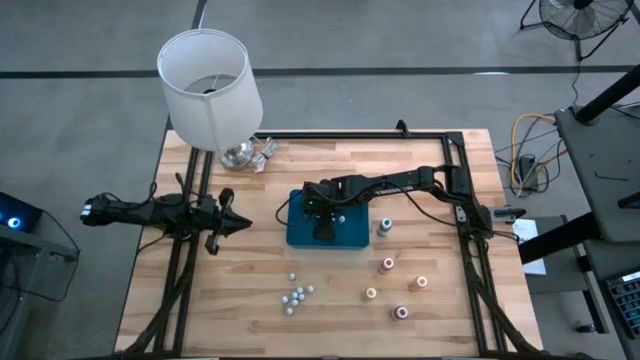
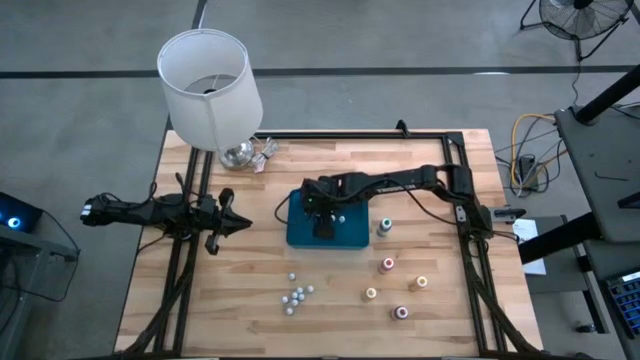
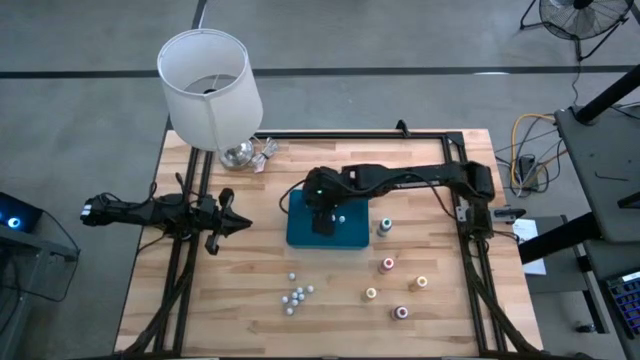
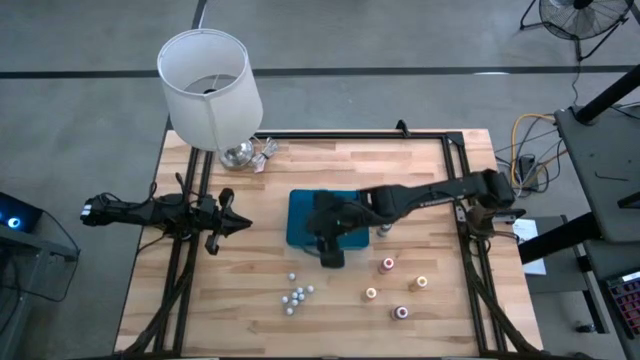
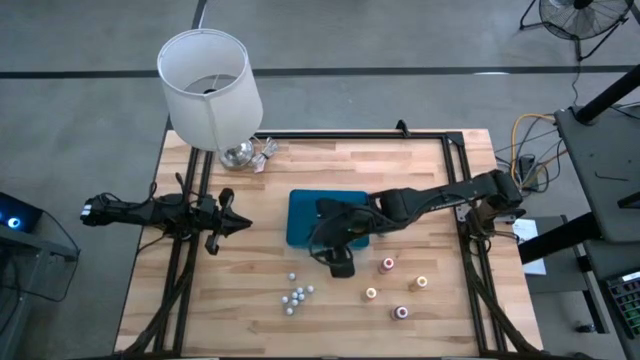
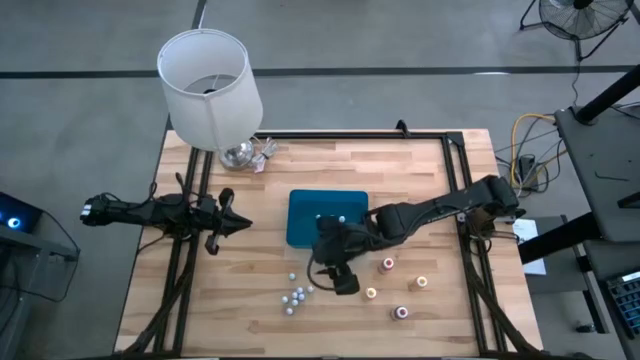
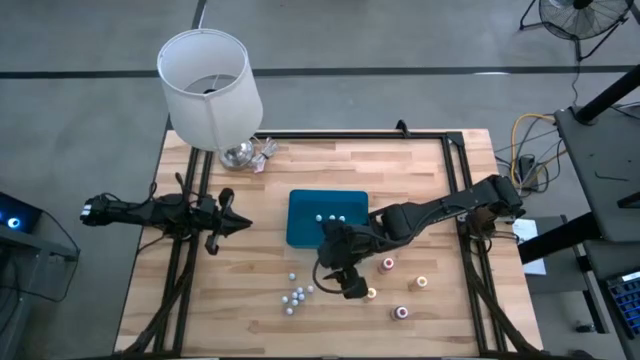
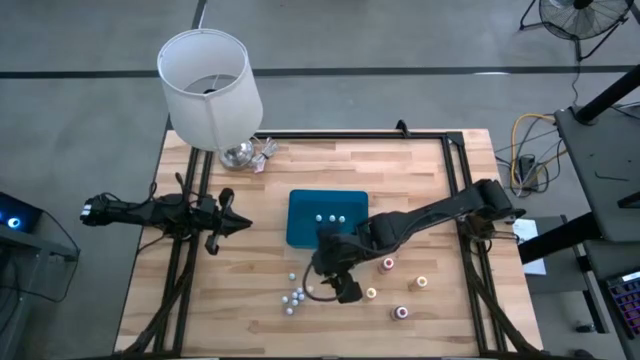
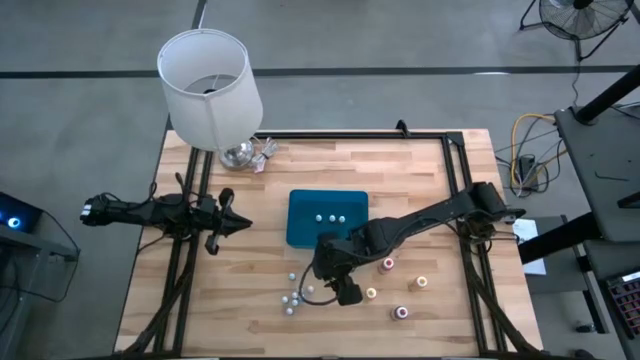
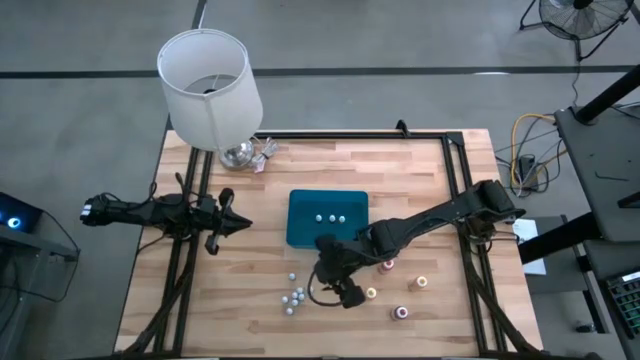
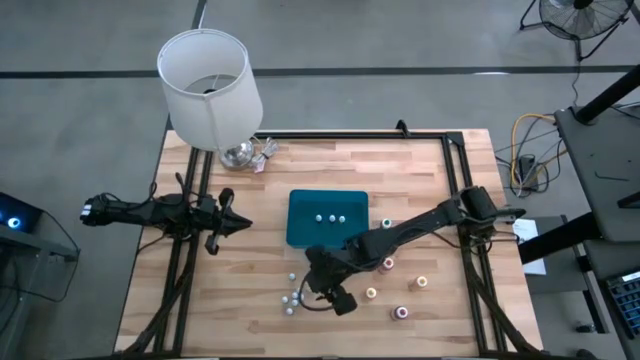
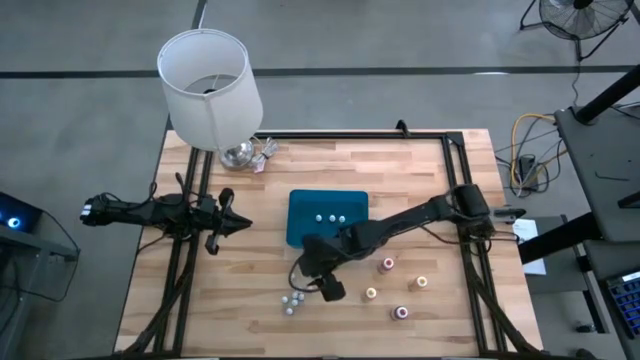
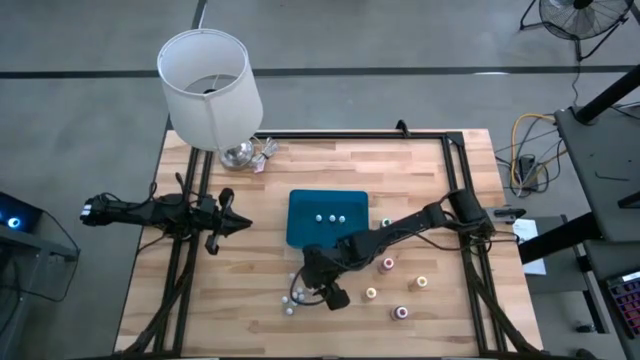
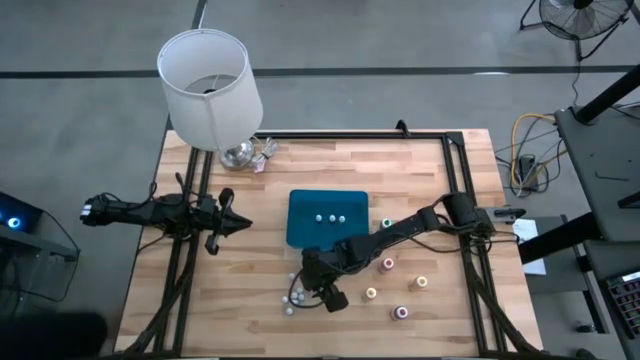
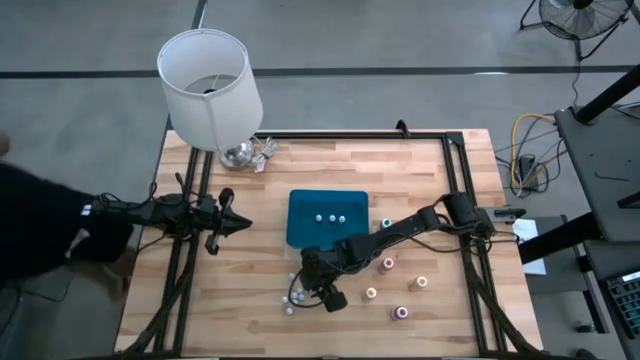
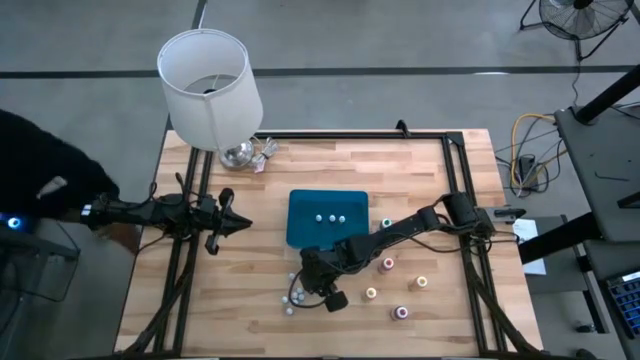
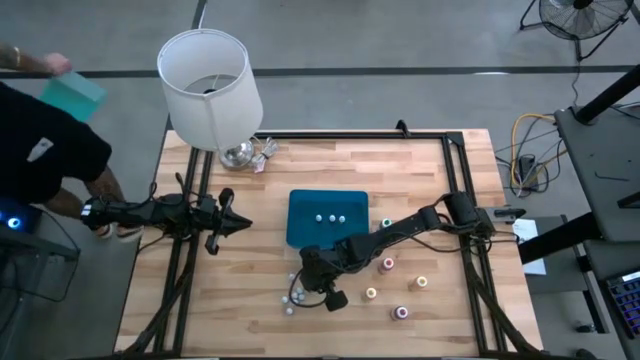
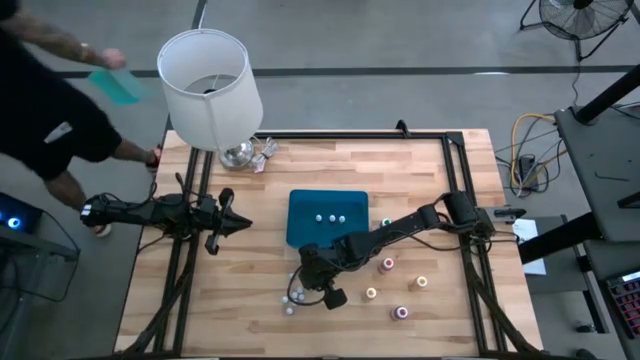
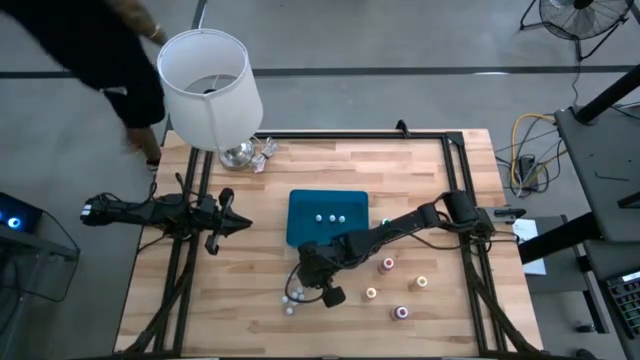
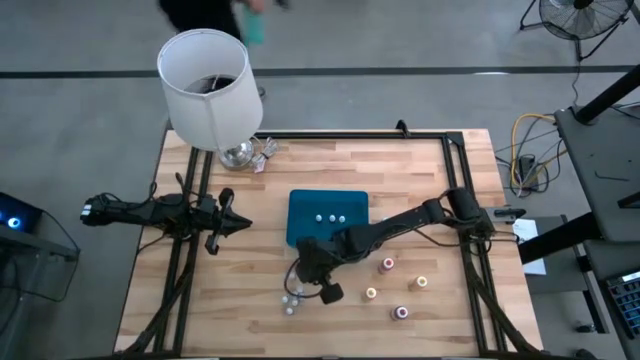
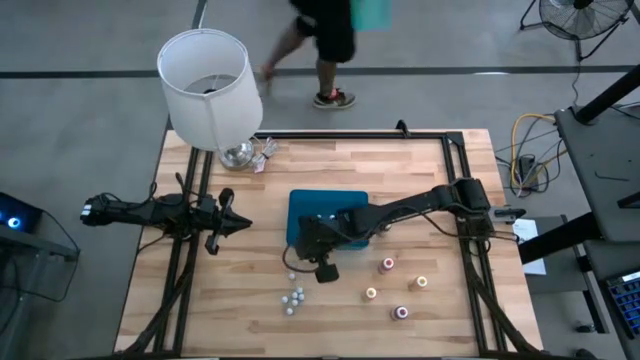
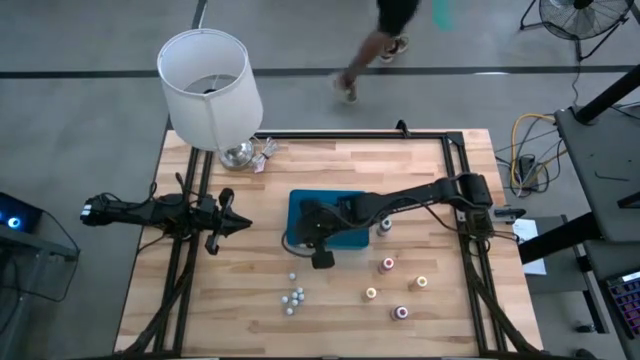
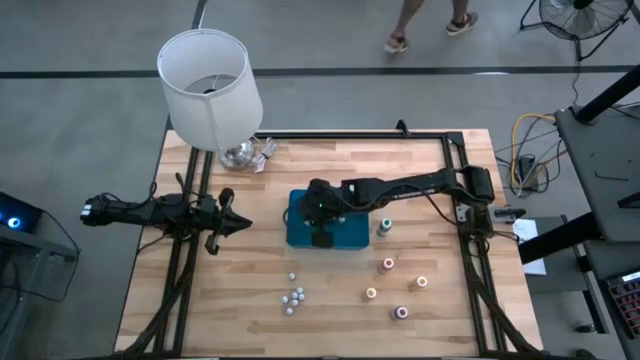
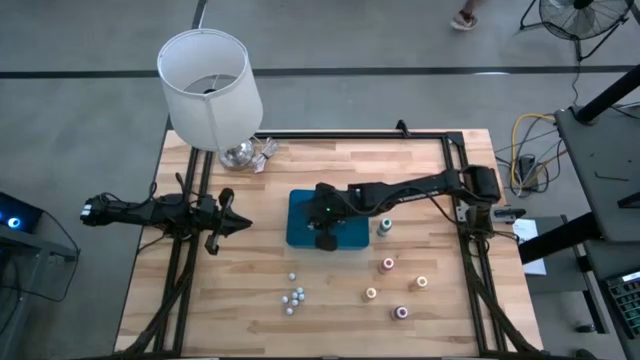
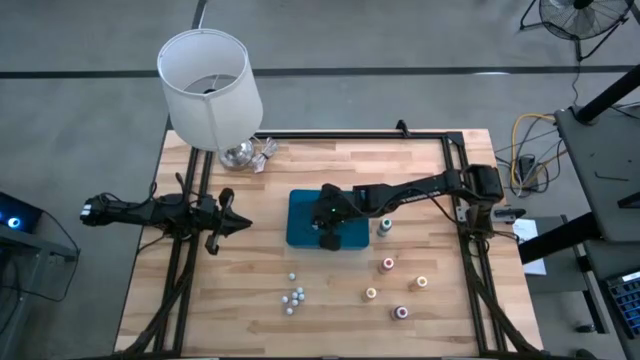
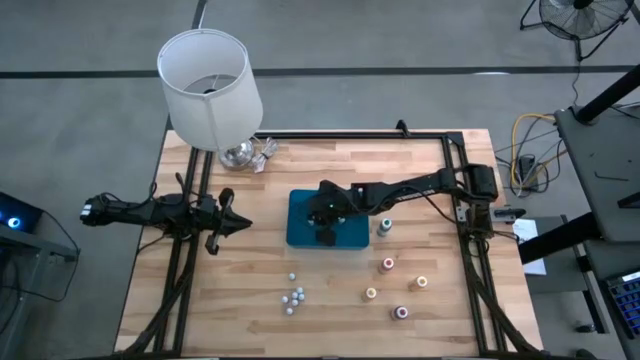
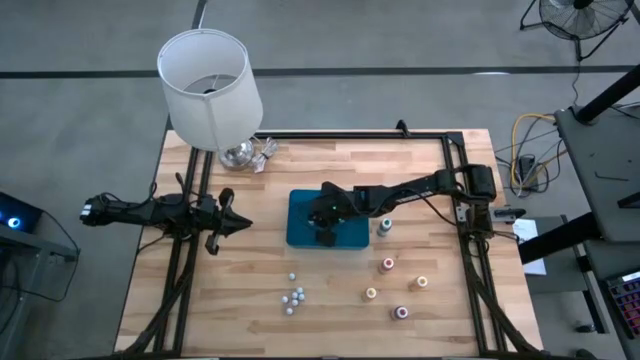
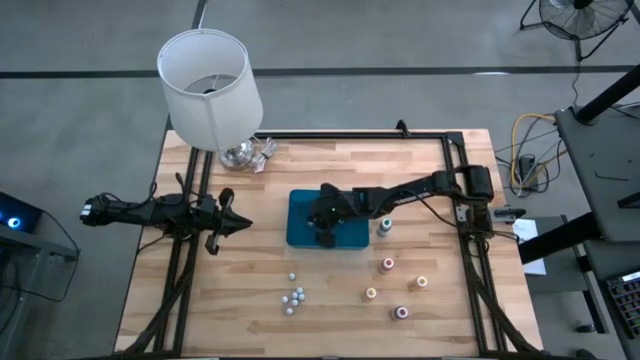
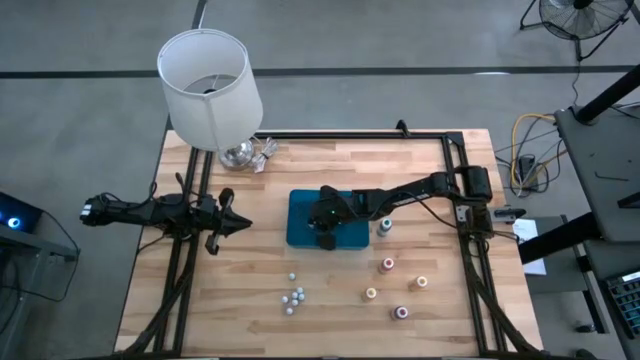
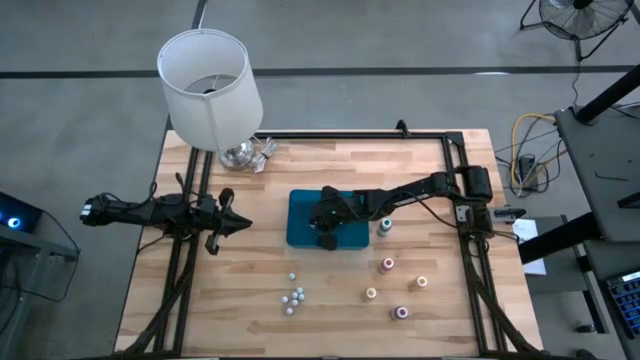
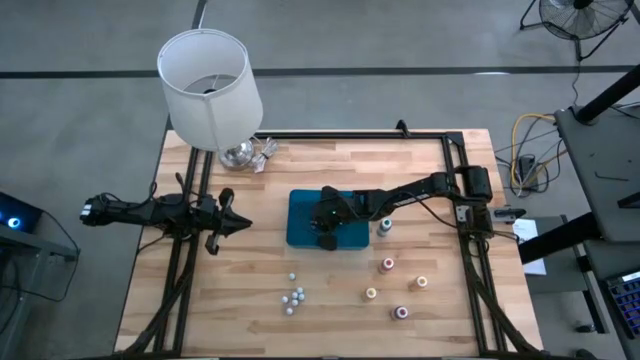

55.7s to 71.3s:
Task: Pick & Place food coloring
Put the bottom small green food coloring bottle into the blue bin

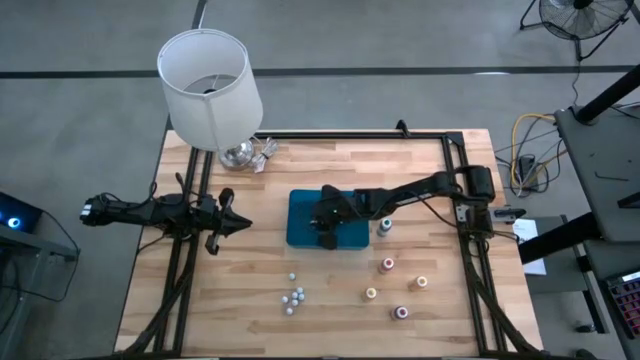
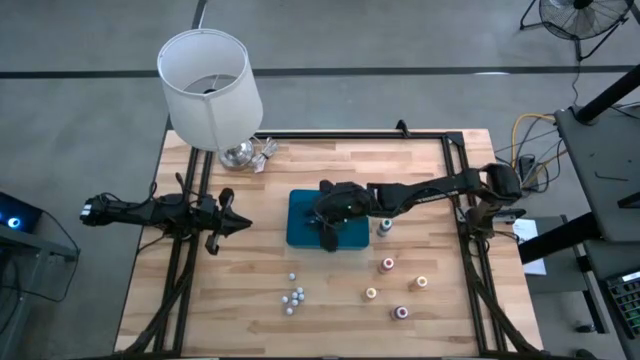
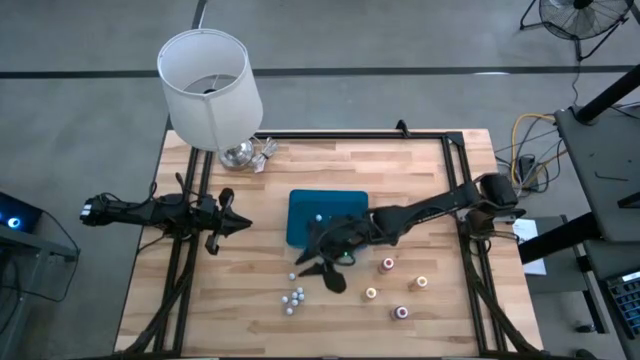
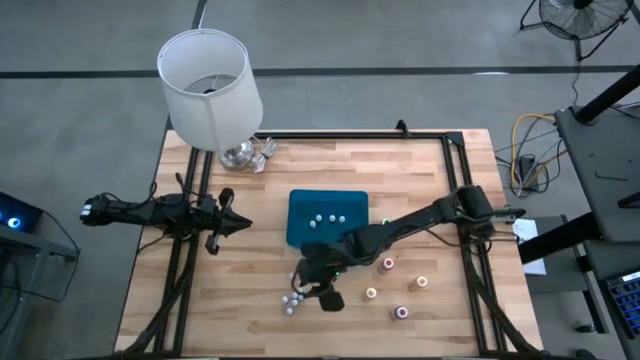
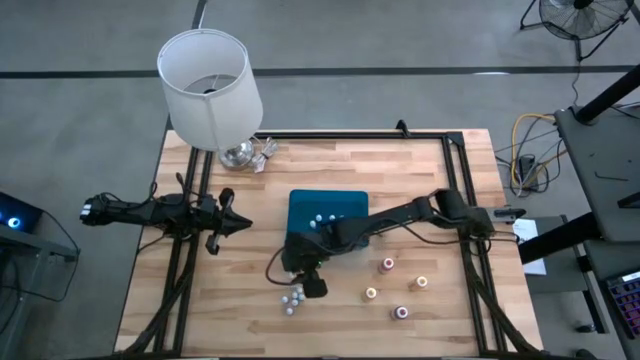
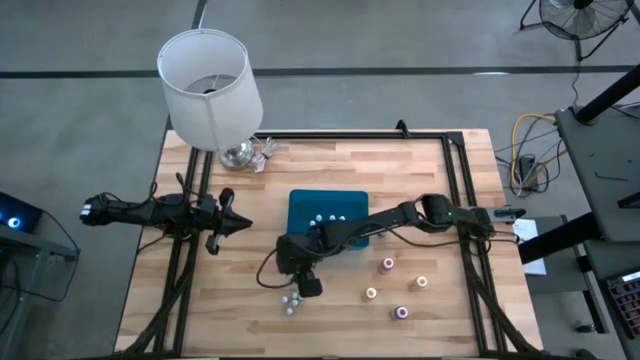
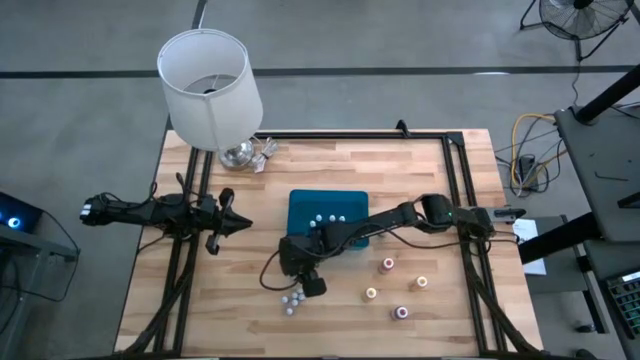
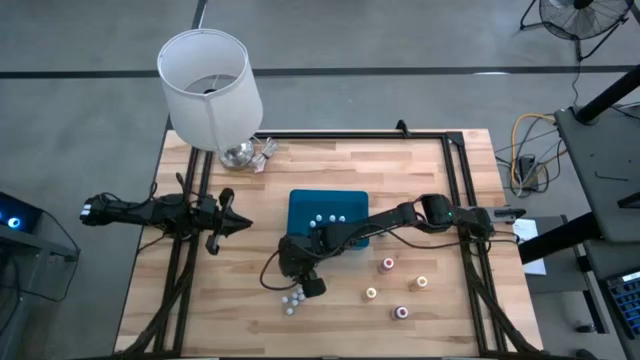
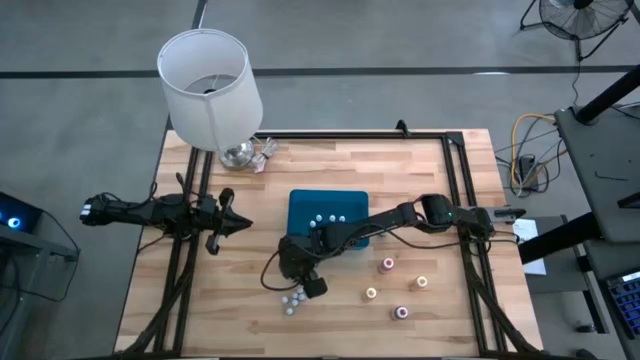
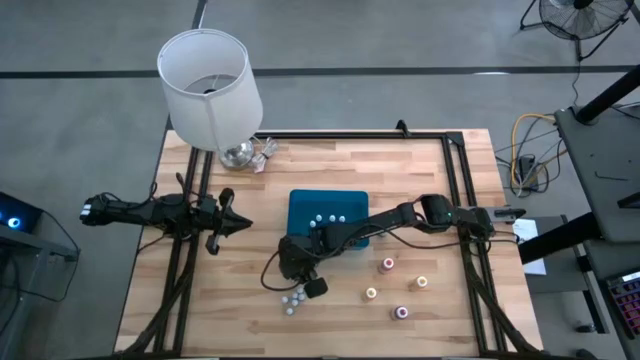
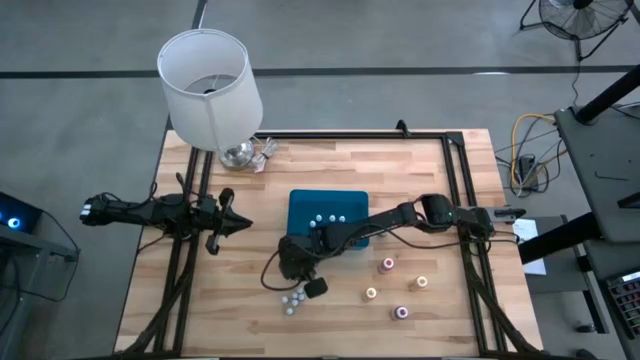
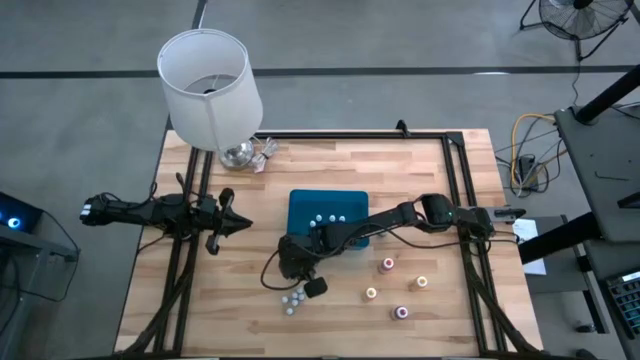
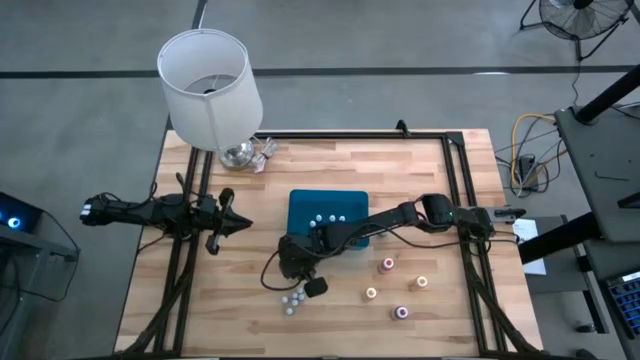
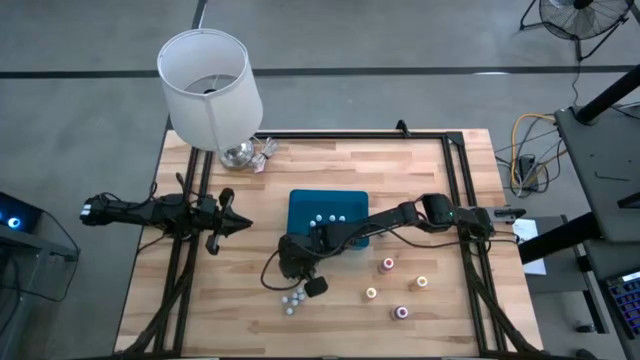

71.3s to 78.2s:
Put the small green food coloring bottle into the blue bin
